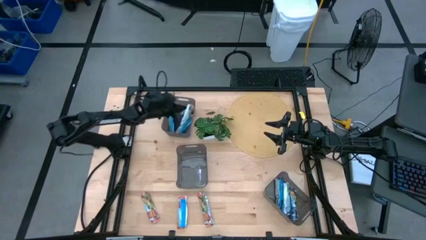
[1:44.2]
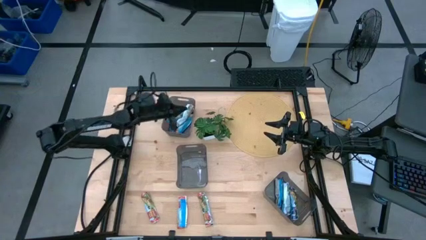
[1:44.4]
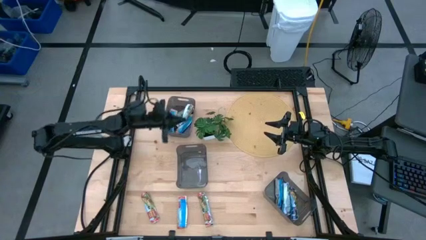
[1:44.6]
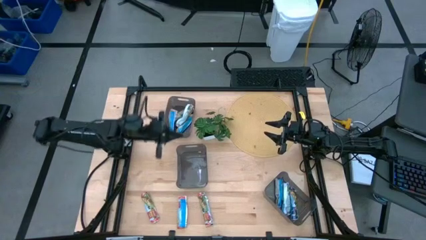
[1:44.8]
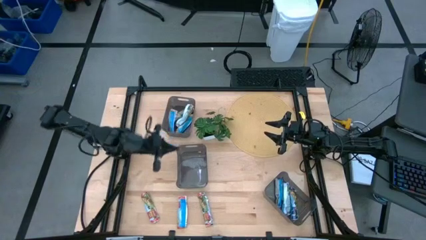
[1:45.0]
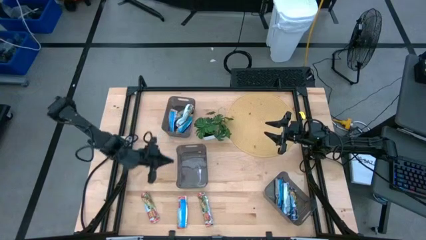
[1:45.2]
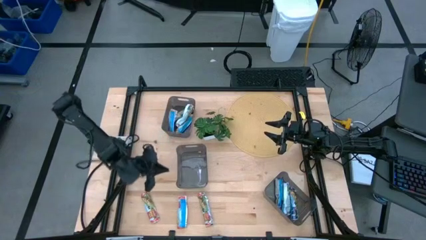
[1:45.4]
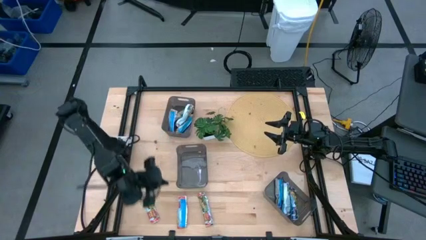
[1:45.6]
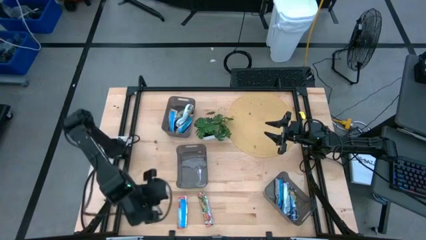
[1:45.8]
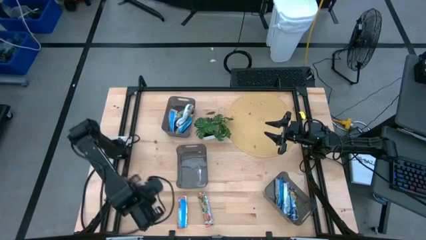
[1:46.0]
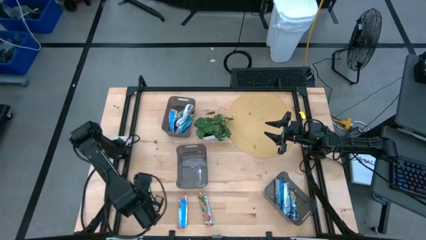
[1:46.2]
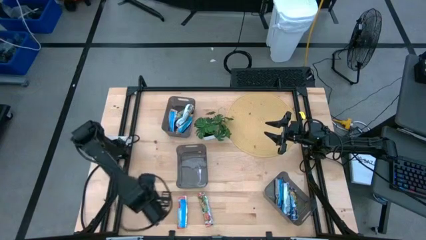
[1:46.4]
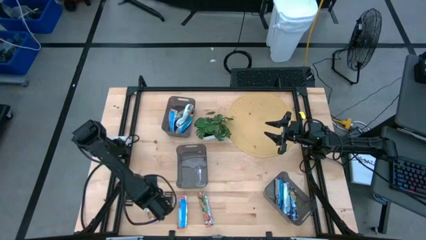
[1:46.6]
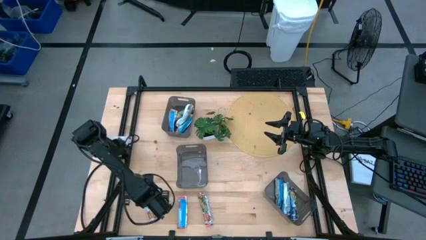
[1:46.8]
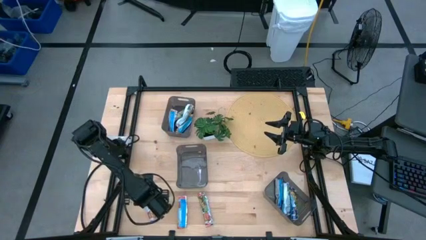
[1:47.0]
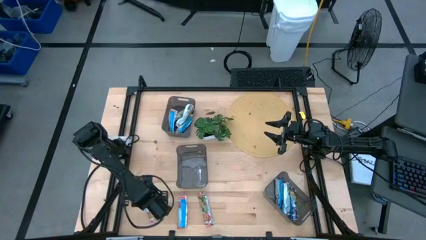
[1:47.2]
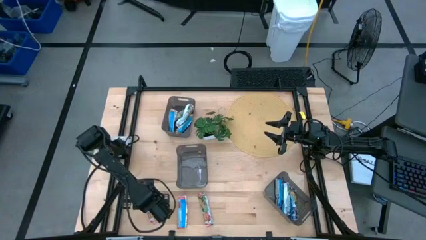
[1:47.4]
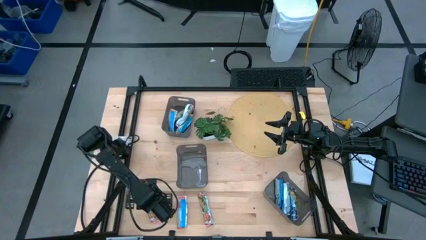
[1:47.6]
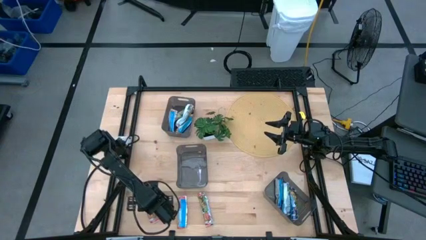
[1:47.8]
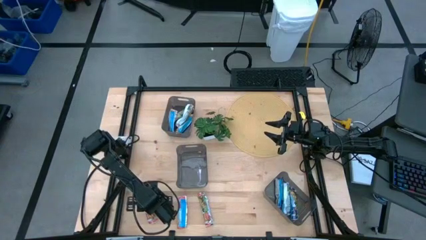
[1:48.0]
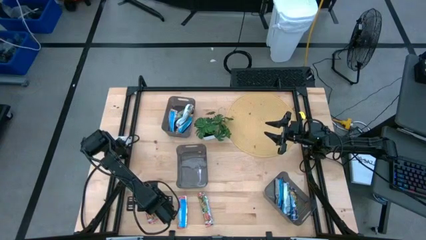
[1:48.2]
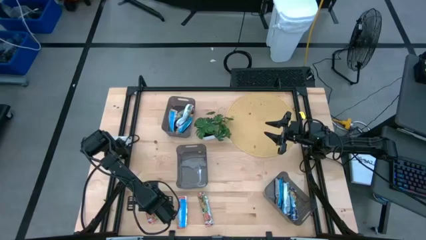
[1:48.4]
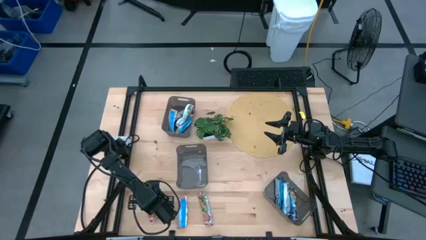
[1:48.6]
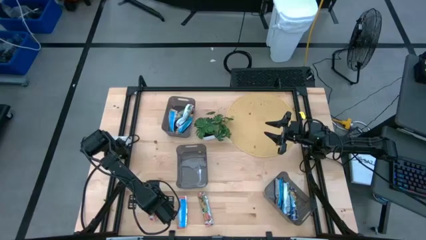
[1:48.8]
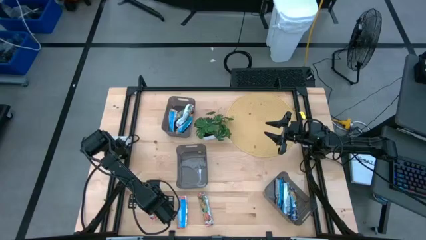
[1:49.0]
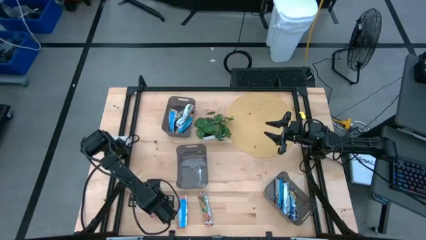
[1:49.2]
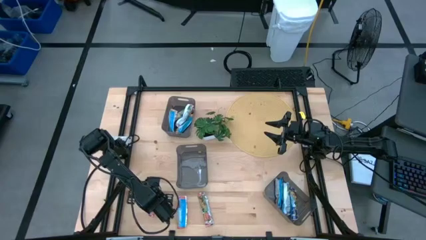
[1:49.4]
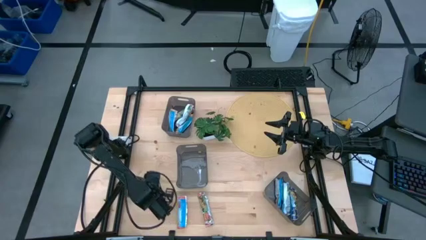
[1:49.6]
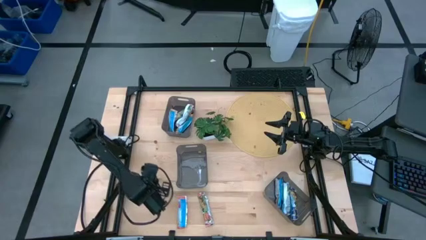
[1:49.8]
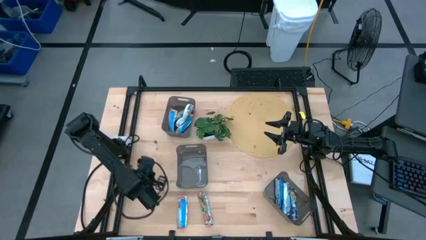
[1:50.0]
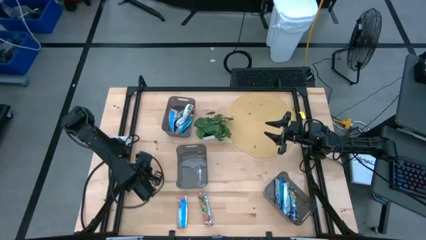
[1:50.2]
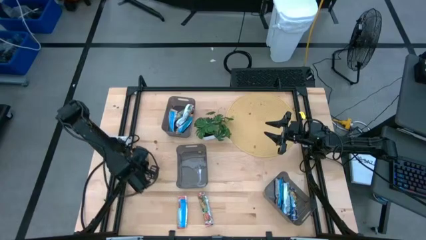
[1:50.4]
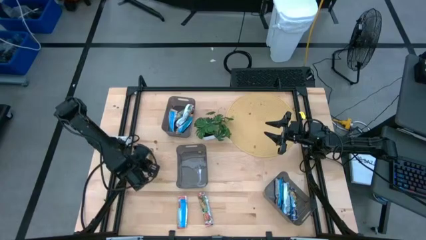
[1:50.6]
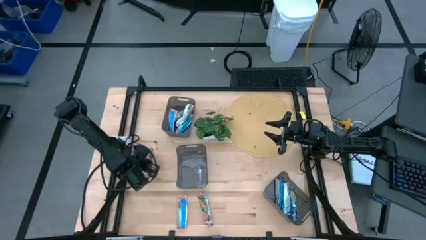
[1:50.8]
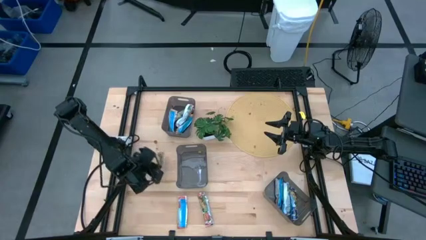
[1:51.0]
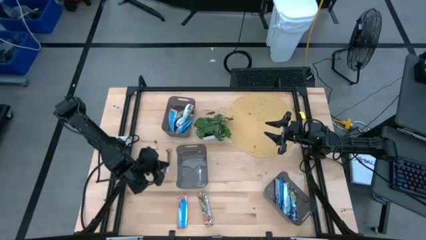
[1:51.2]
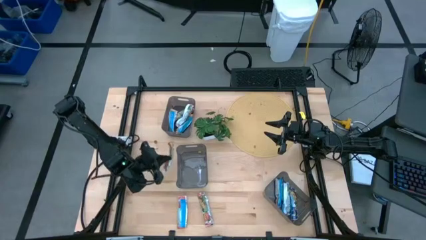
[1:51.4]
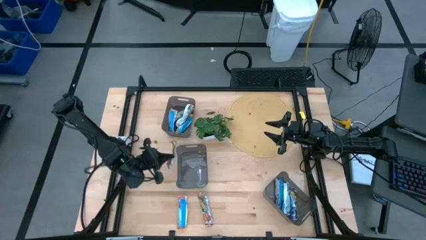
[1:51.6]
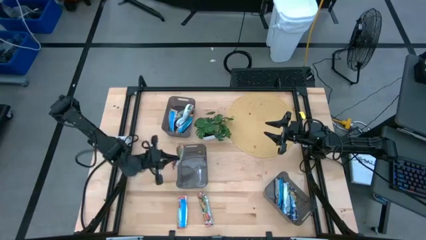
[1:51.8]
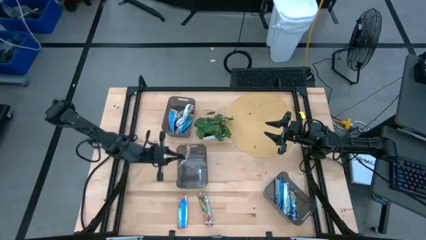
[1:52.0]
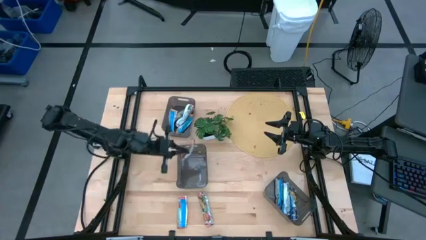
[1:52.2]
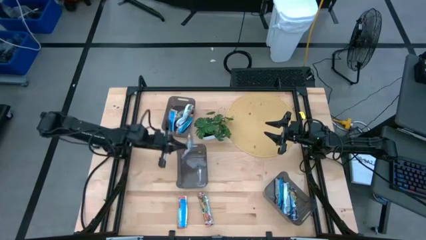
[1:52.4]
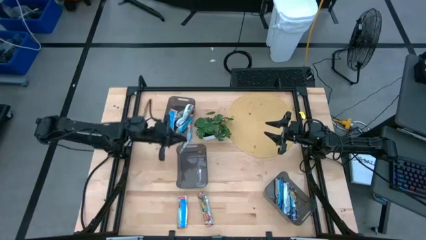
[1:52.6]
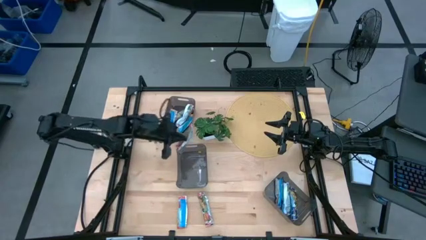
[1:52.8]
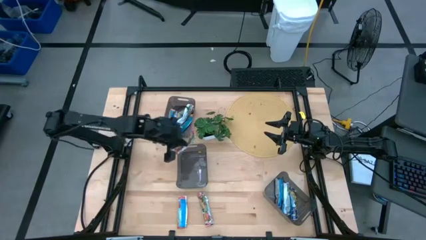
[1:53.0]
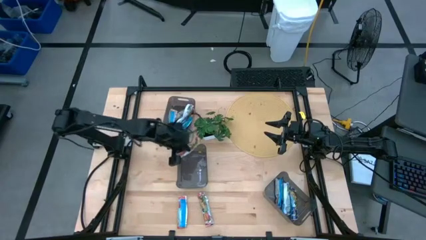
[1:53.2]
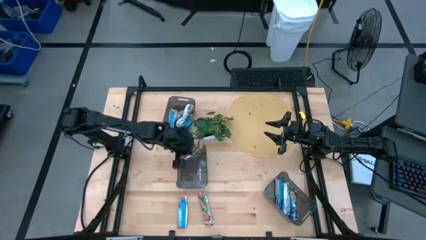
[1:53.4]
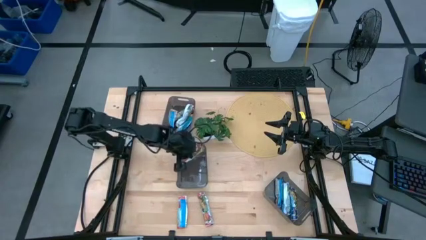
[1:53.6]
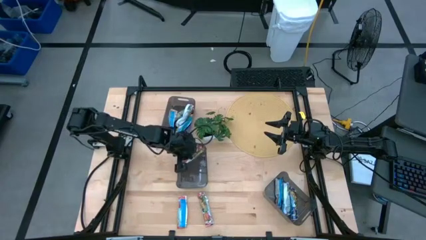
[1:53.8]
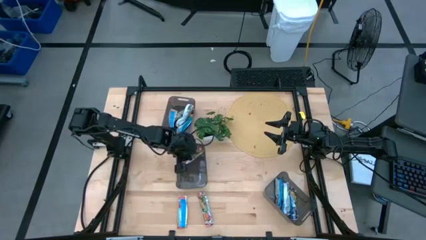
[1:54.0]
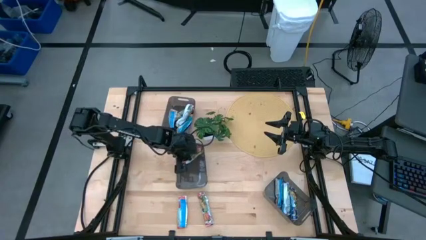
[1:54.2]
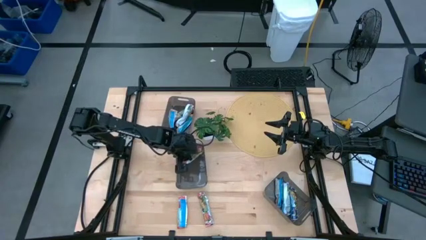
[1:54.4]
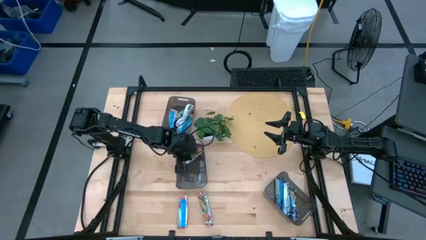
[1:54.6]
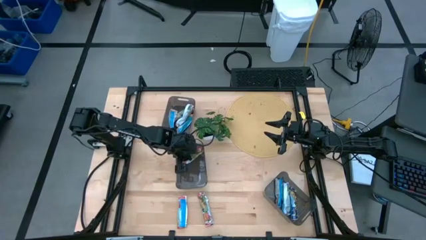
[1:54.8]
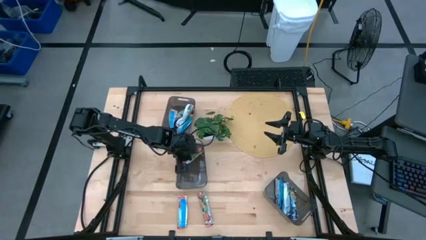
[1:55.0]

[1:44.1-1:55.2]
Task: Pick and place Granola Bars by type
Put the left red granola bar into the bottom left black bin

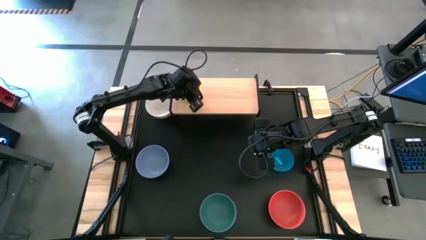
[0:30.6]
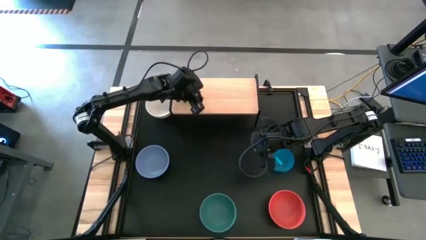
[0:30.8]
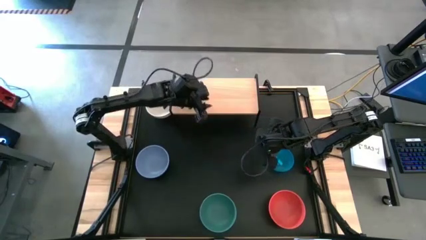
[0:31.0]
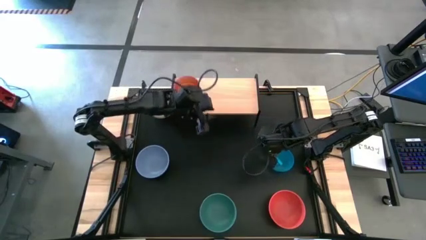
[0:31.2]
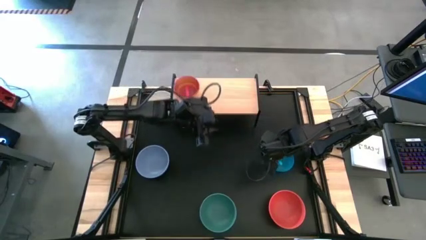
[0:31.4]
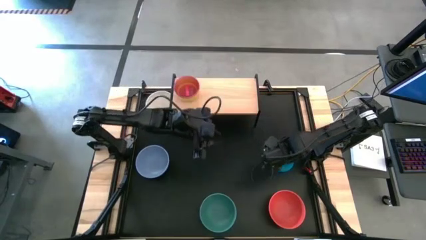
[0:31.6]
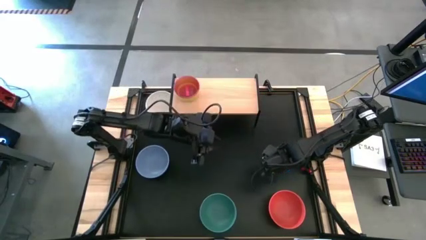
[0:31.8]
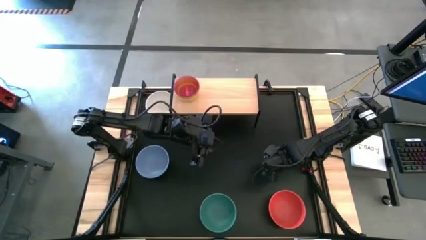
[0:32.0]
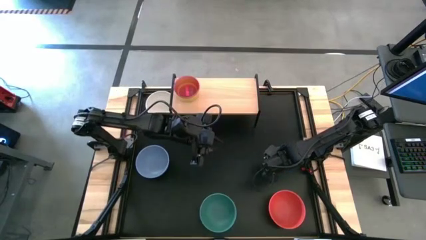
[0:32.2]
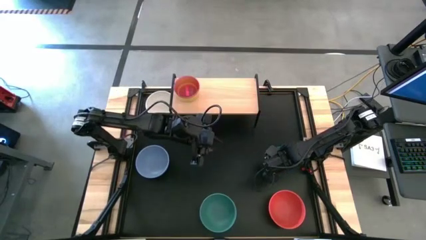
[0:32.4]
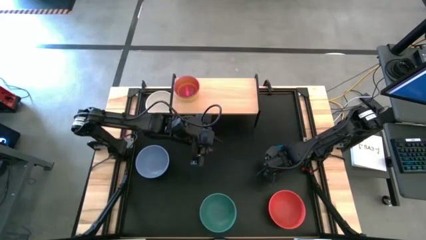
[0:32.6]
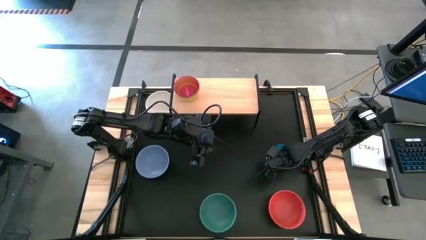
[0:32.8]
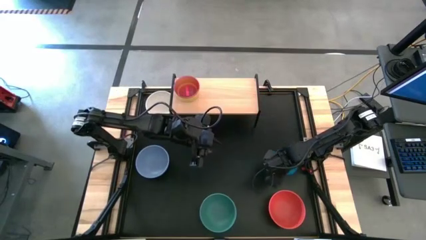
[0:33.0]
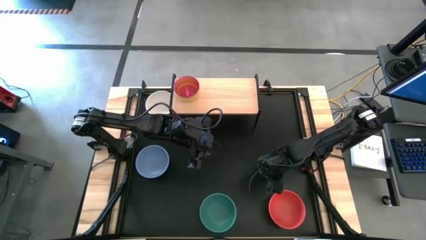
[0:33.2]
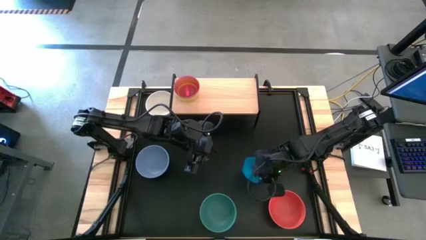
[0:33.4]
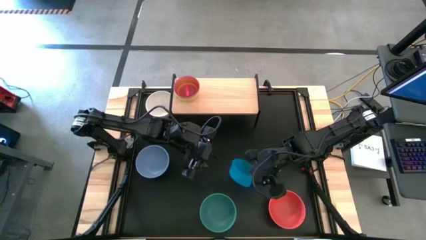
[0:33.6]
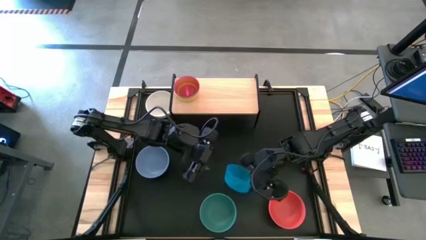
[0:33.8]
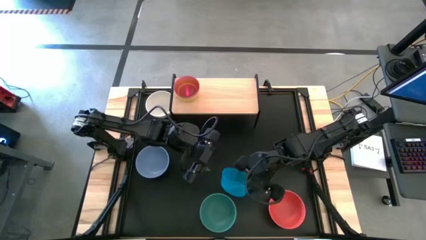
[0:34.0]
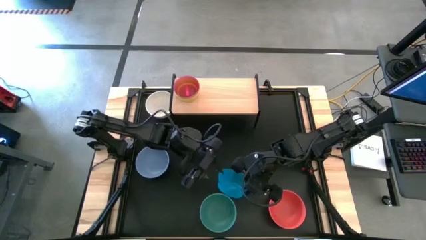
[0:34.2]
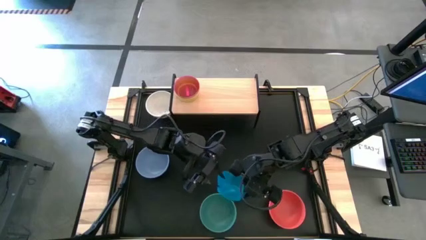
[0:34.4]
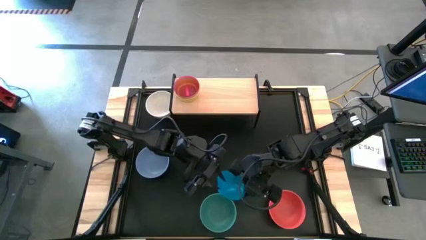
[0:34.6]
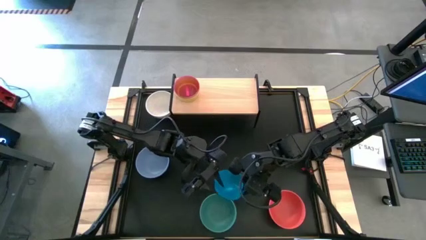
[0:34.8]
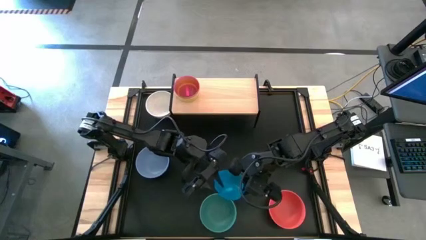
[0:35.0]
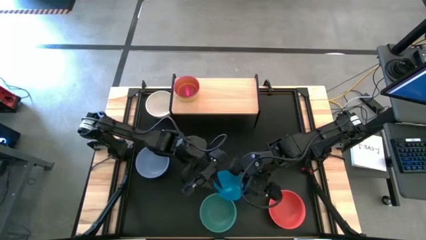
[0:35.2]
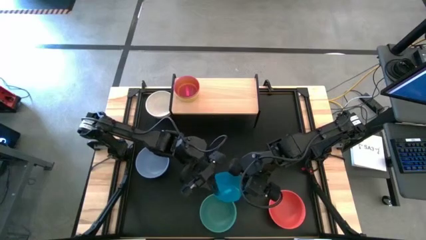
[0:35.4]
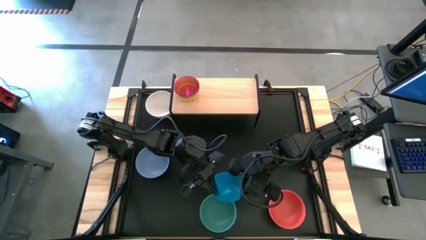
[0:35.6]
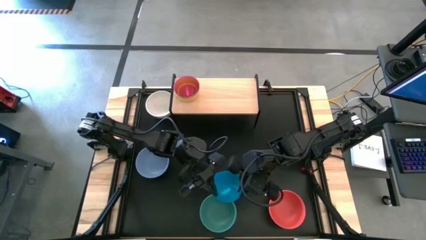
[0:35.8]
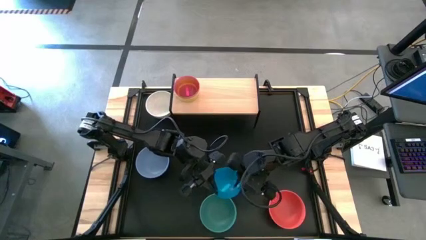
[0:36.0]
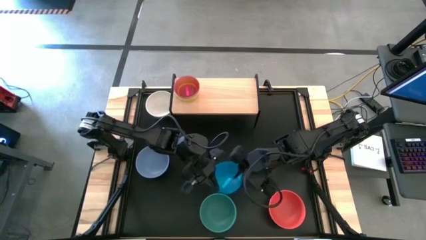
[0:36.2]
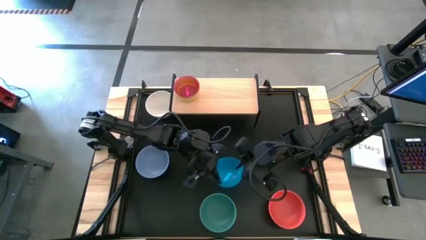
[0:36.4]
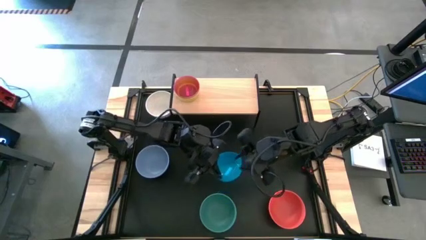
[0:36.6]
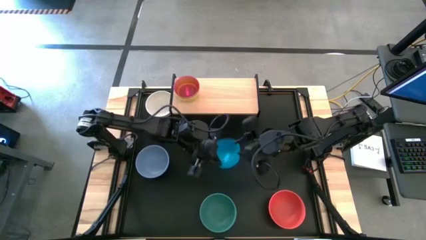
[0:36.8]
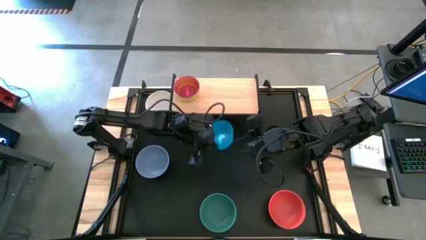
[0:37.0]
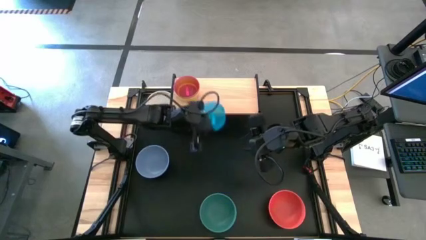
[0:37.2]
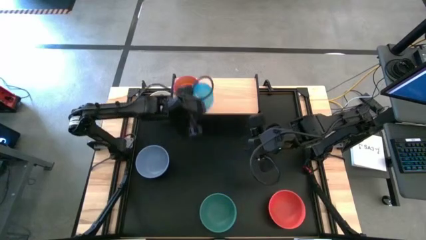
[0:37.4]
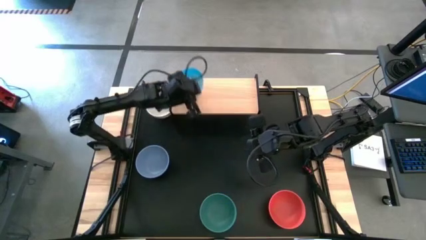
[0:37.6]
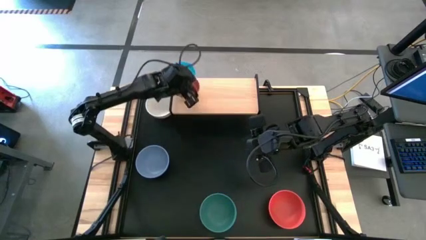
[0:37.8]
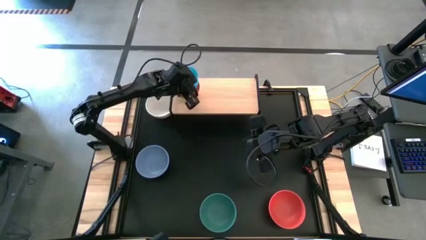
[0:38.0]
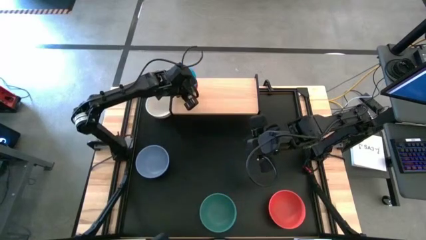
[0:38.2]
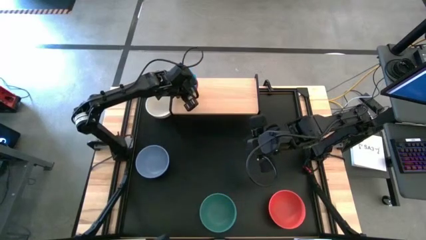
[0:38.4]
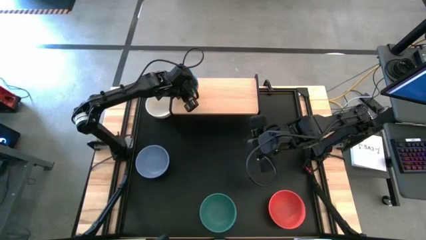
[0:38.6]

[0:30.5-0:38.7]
Task: Place and stack bowls onto a shelf
Stack the small blue bowl on top of the small red bowl on the shelf
